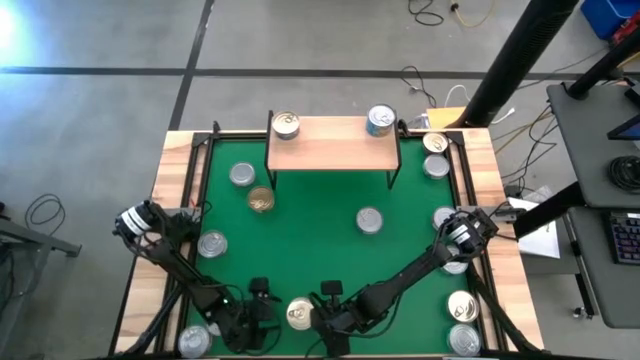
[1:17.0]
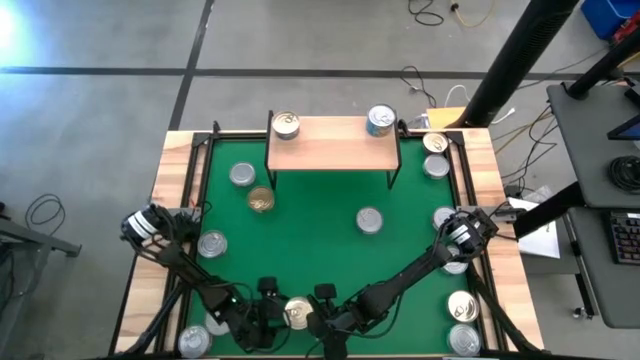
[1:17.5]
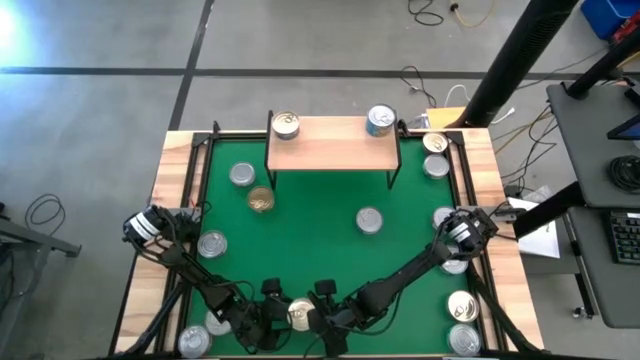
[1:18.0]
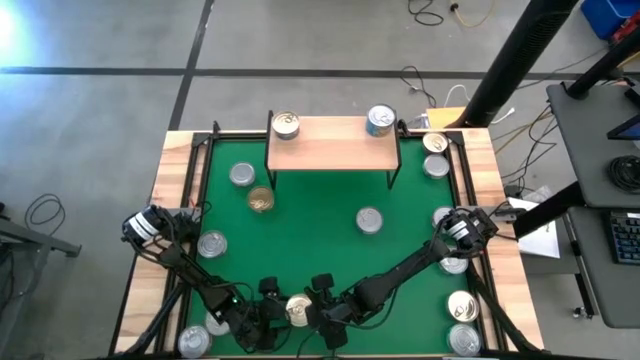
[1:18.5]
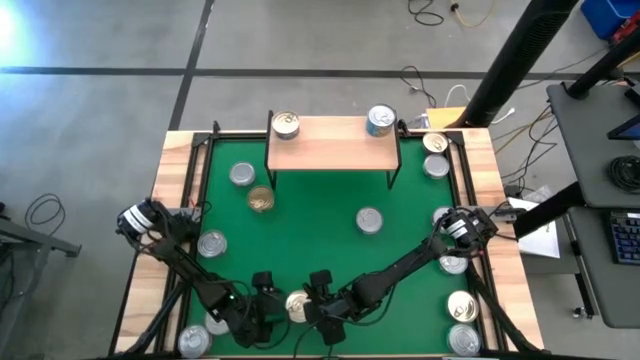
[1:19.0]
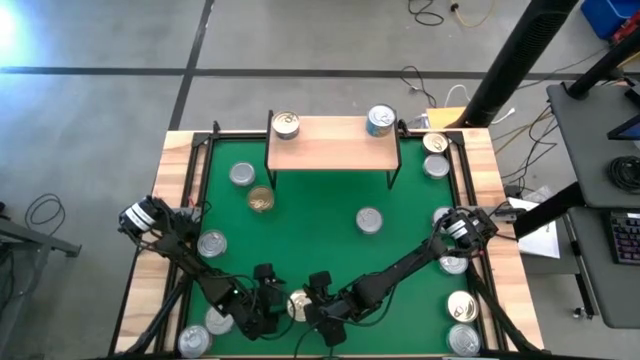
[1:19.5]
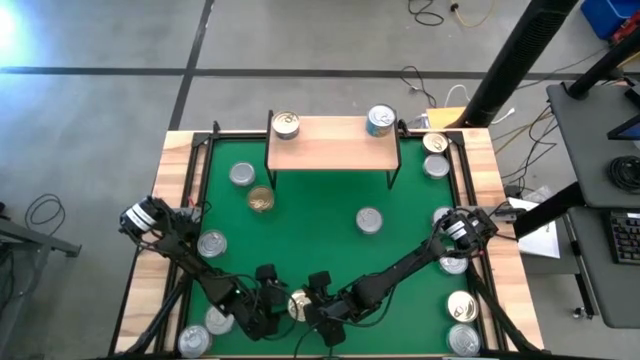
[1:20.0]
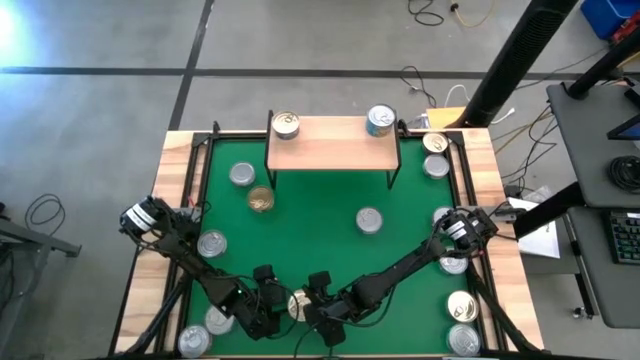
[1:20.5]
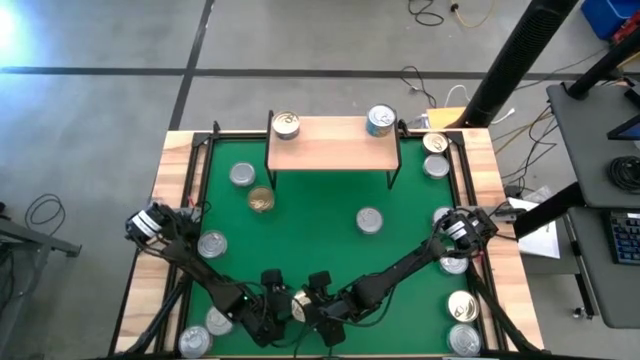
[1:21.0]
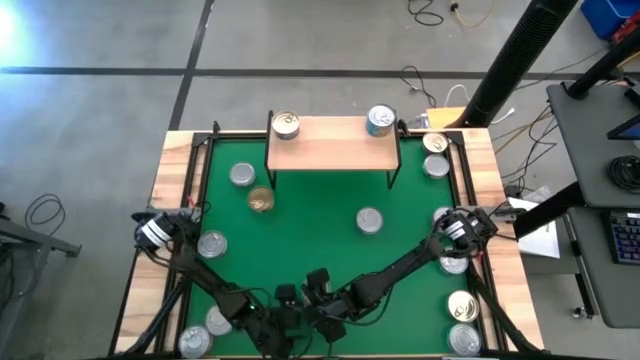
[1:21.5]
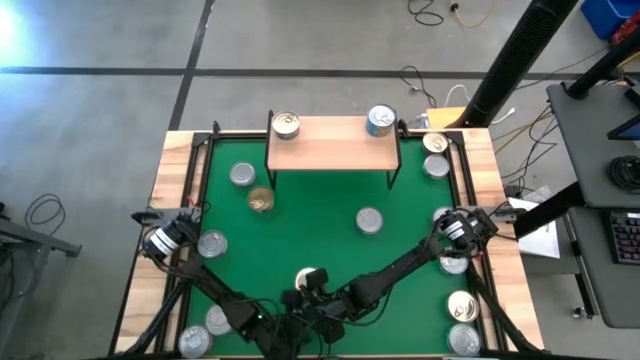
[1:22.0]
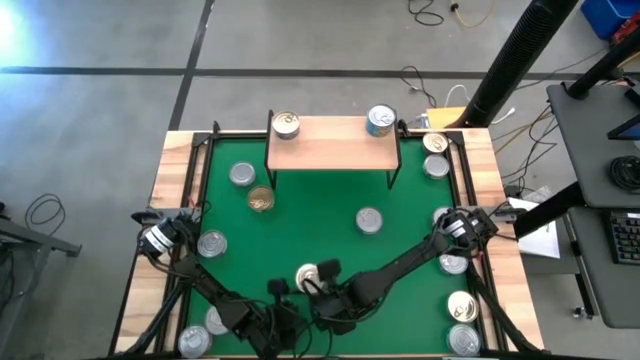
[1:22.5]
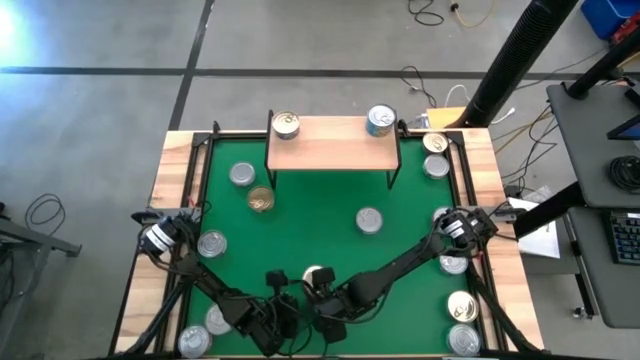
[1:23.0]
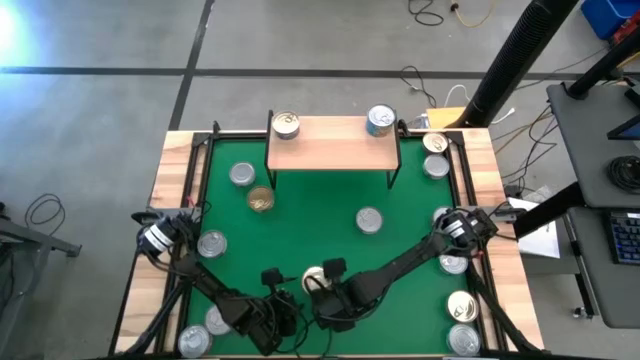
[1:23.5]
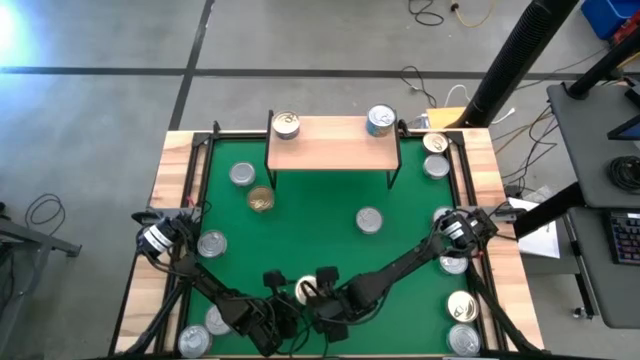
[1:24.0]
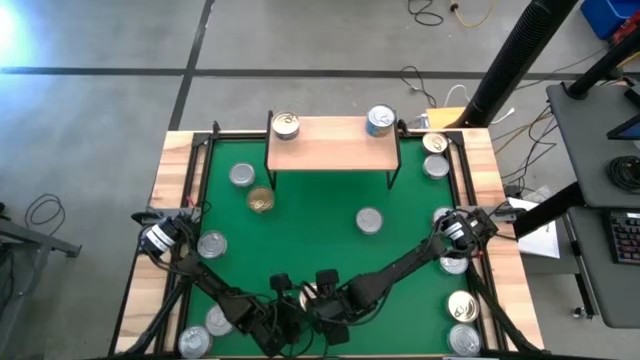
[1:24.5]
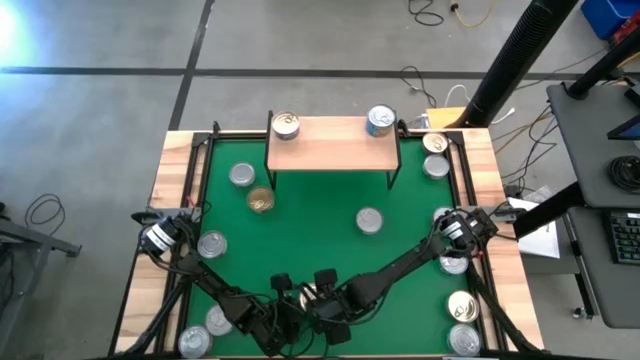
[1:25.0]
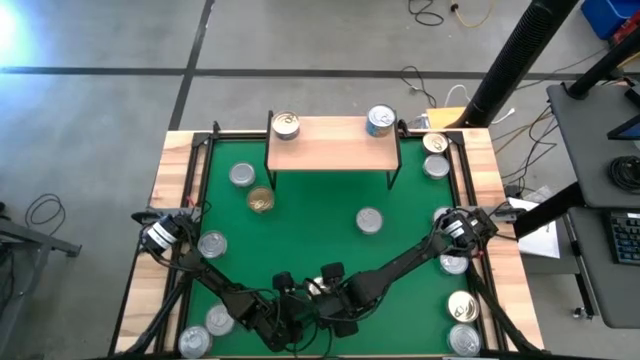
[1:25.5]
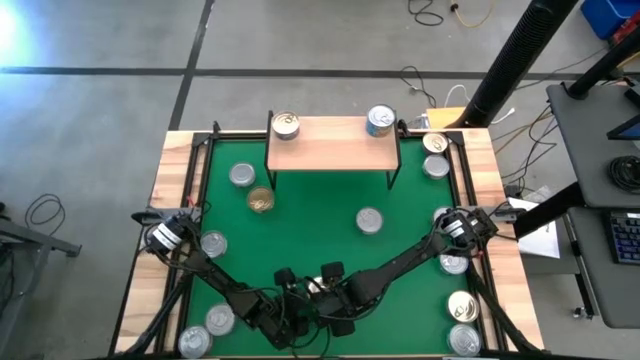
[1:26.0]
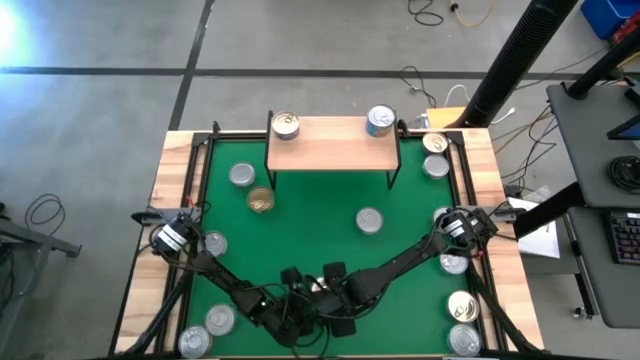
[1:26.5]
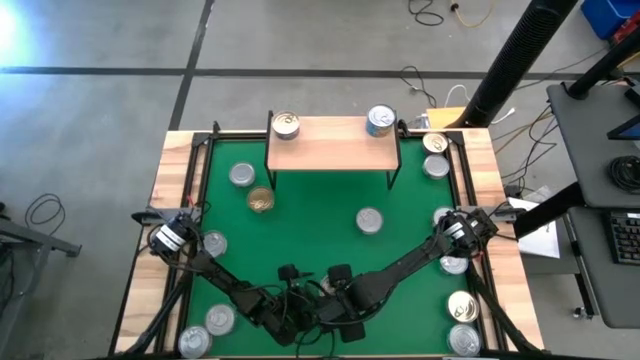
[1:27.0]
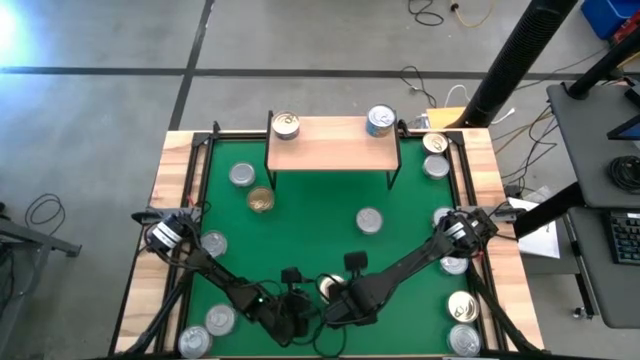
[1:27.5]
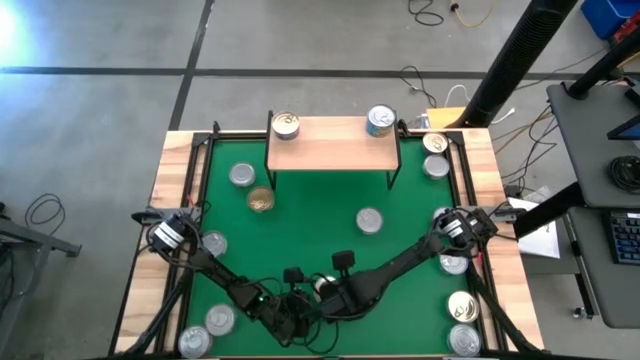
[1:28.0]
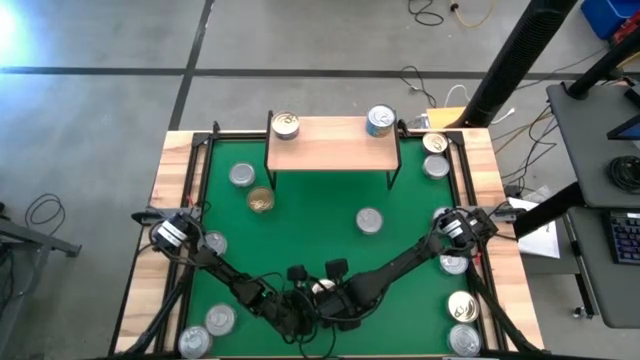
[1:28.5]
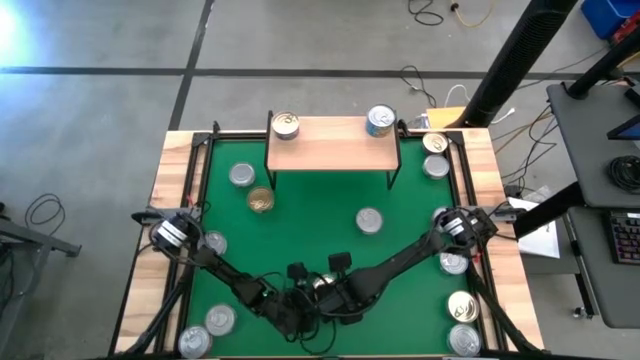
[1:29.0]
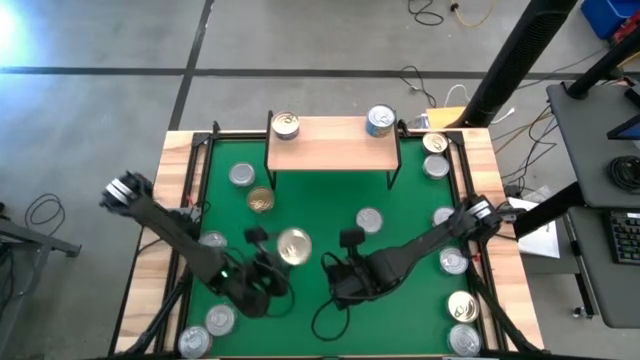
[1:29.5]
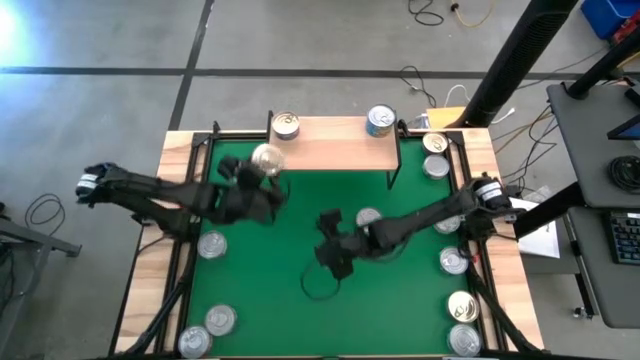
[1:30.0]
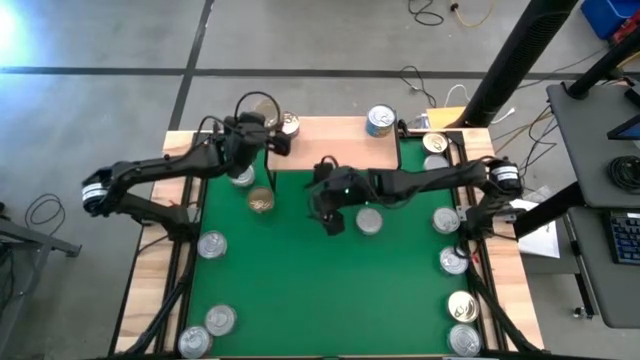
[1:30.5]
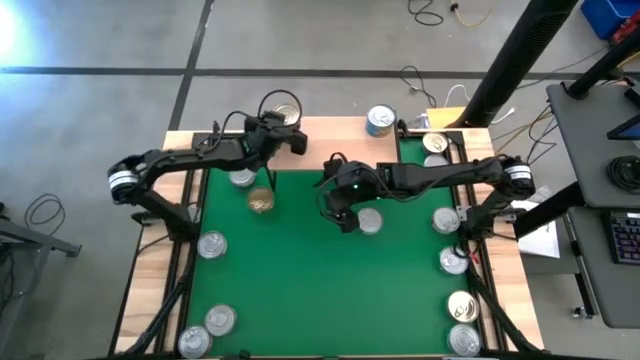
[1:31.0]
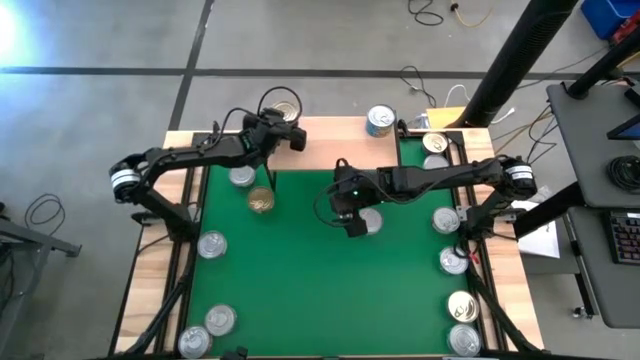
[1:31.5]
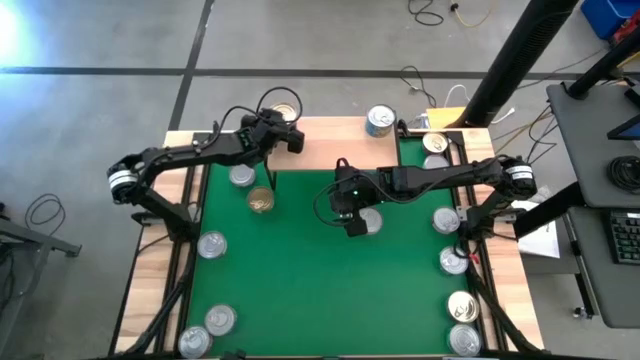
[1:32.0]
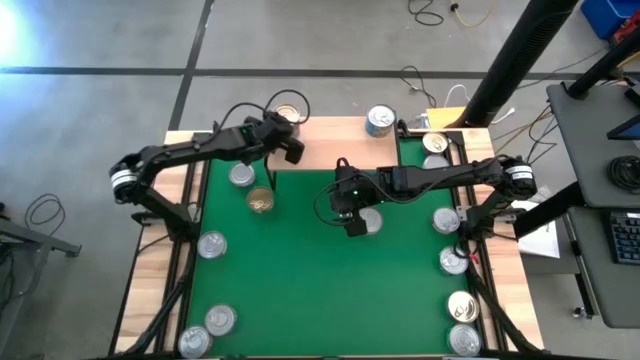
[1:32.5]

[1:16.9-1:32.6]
Task: Stack canned seafood by type on shelf
Stack the blue pink tuna can on top of the blue pink tuna can on the shelf

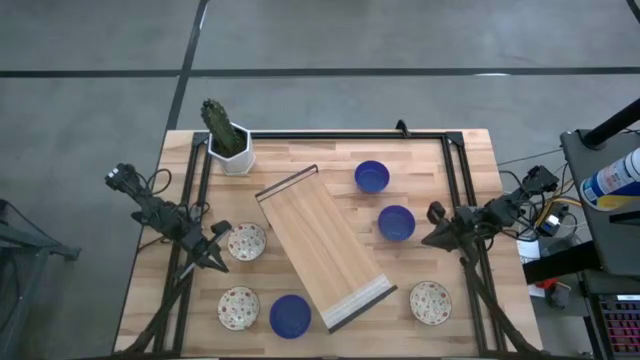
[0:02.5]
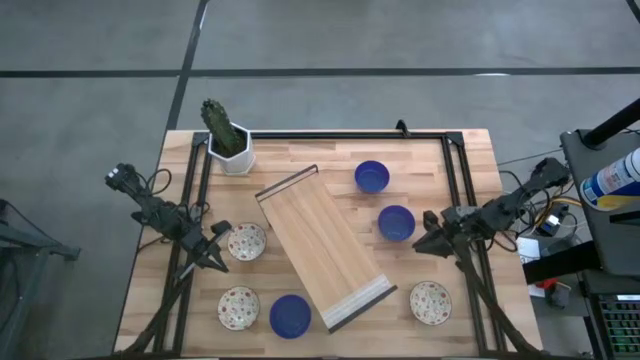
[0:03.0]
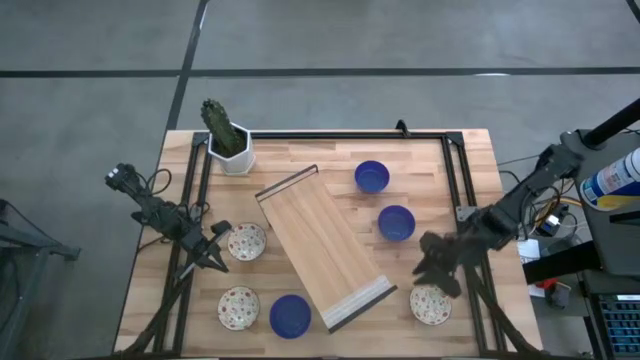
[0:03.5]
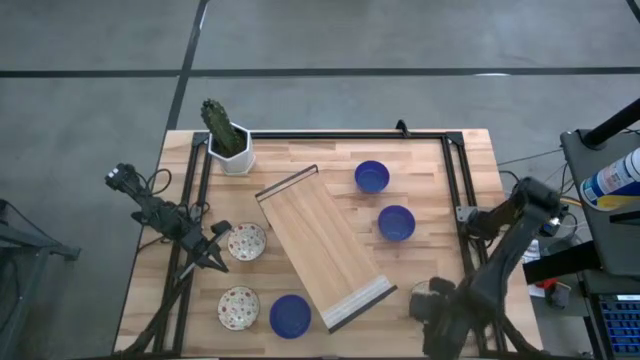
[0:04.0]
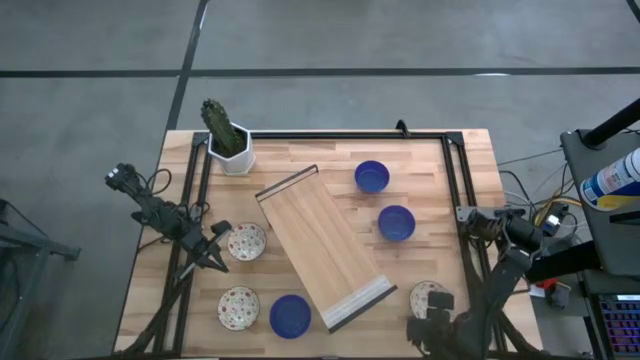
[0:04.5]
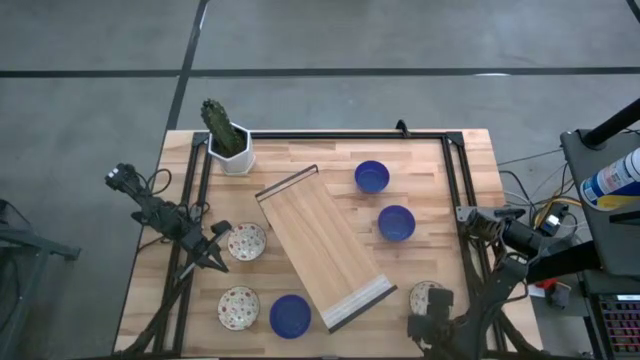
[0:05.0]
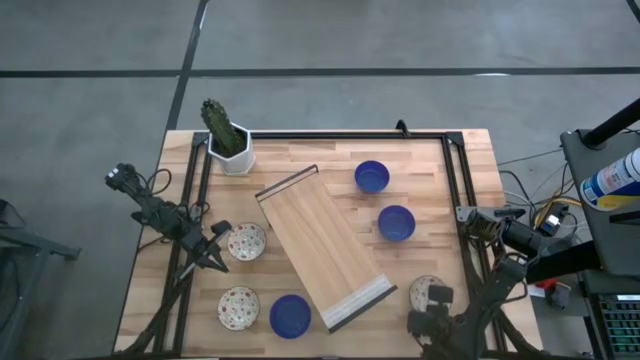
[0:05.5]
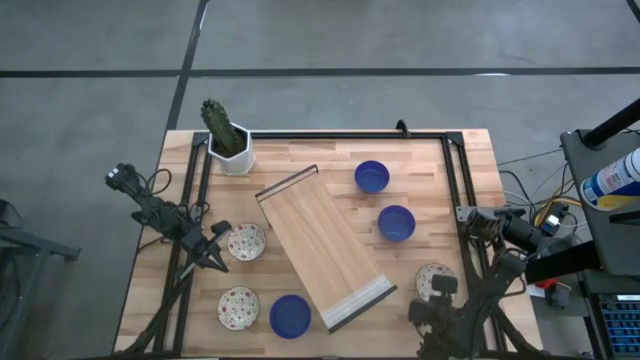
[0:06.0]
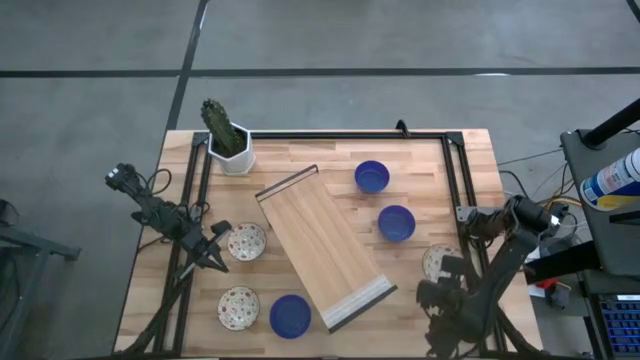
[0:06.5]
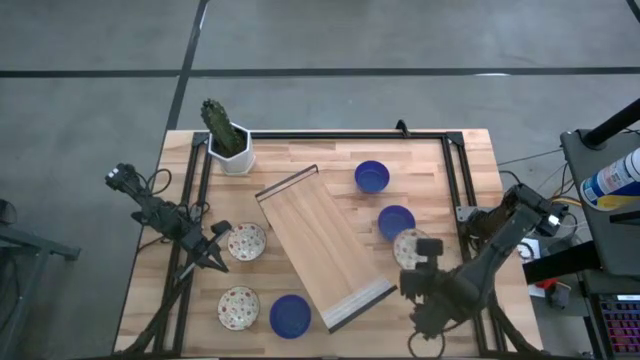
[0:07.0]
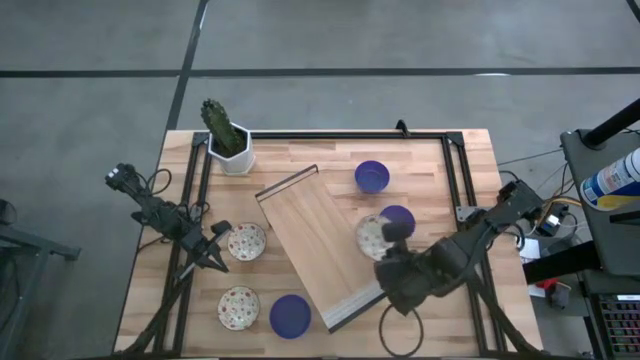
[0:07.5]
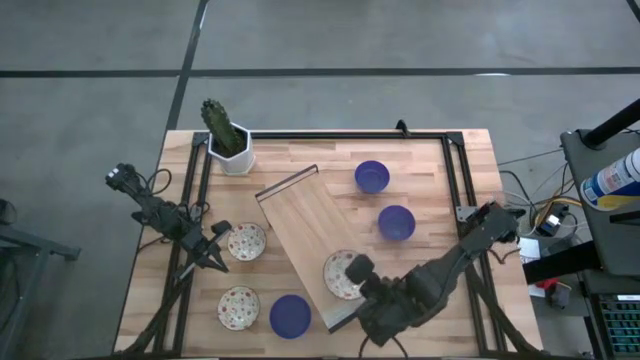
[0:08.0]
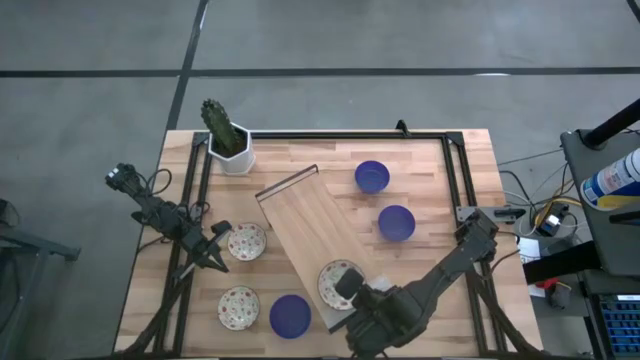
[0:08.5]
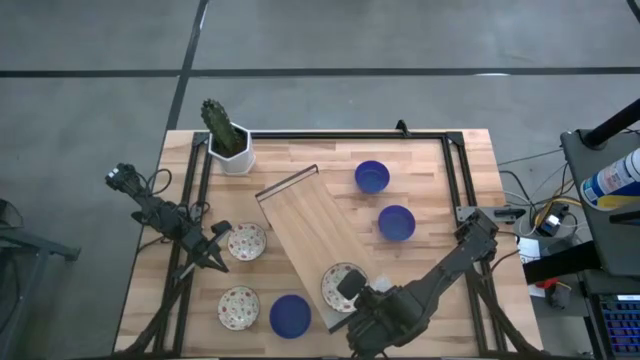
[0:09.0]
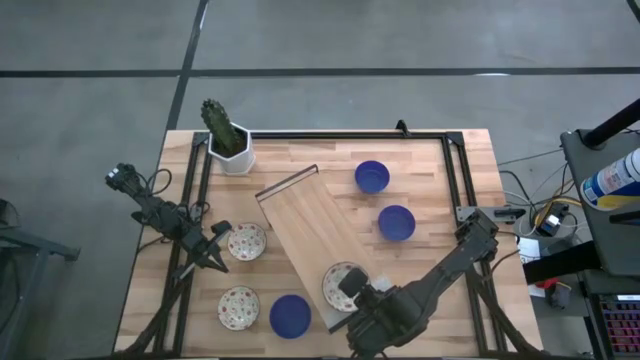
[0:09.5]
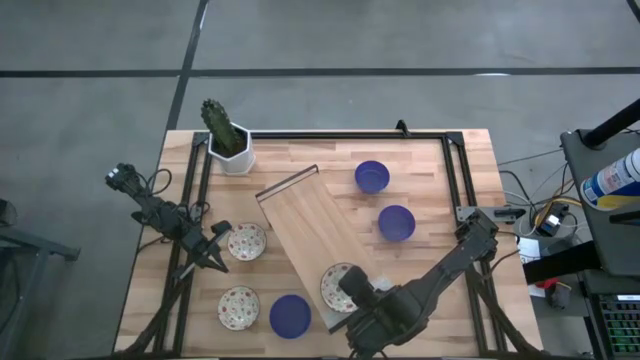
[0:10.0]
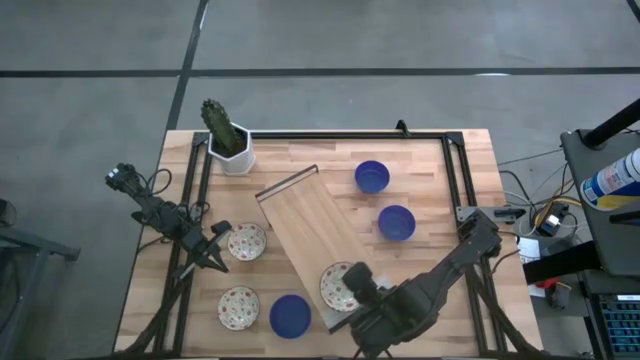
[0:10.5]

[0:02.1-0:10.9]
Task: Pick & Place Mini bowls
Put the bottom right white patterned bowl on the shelf
